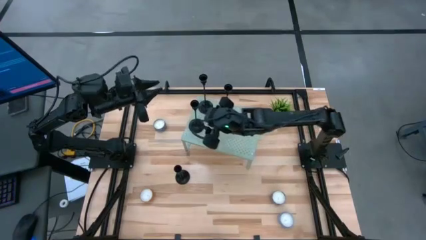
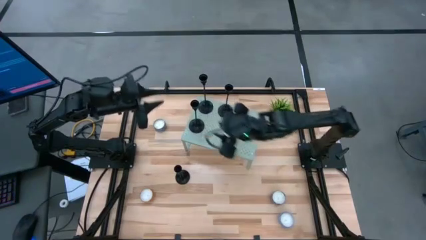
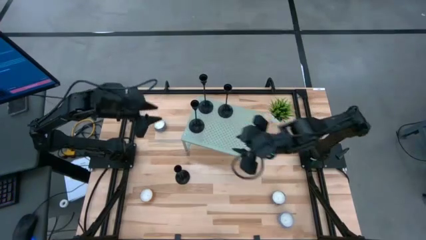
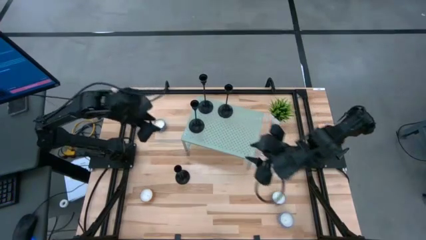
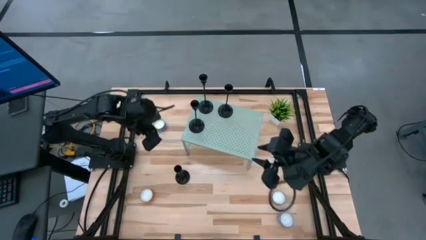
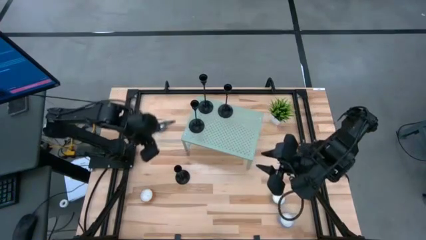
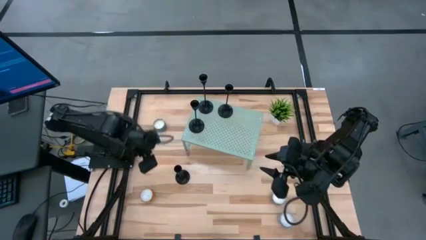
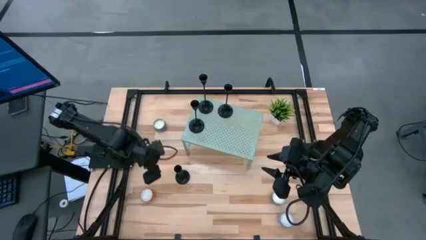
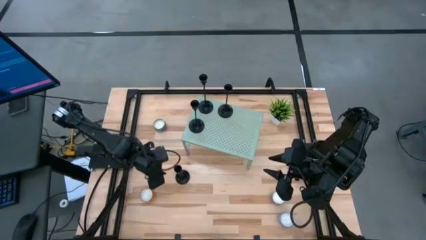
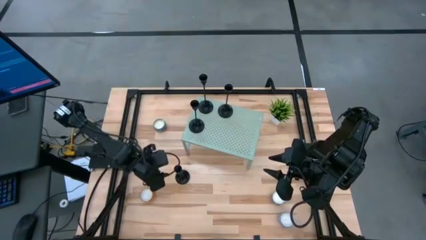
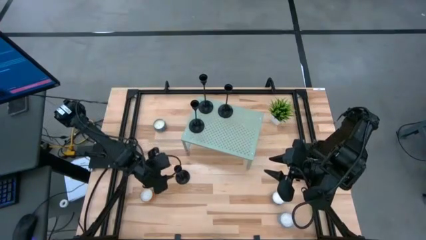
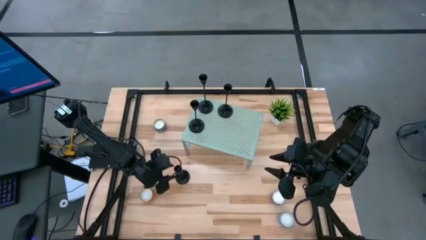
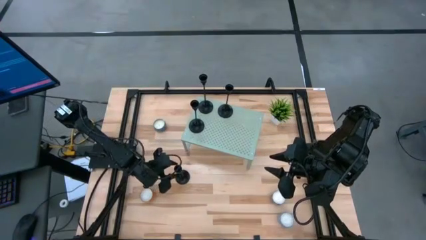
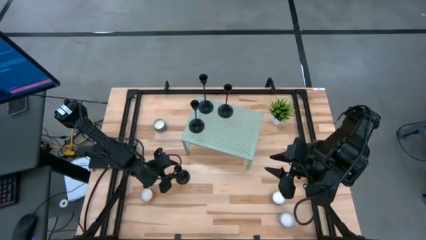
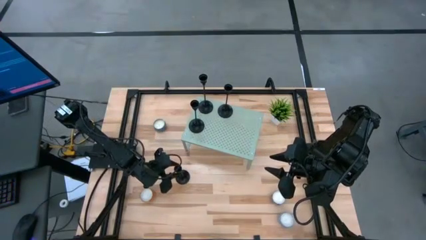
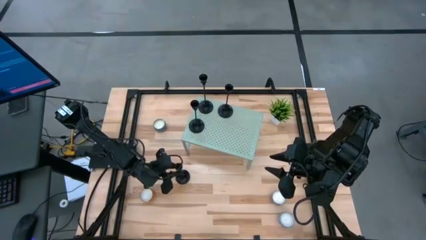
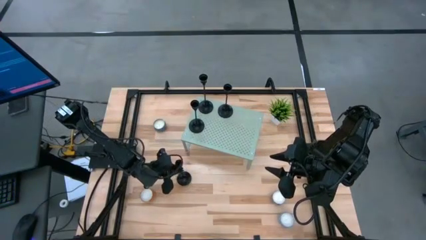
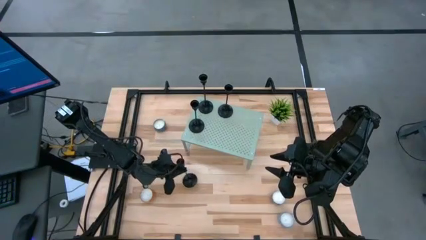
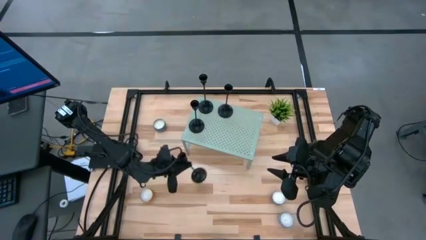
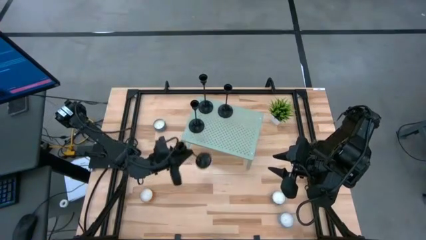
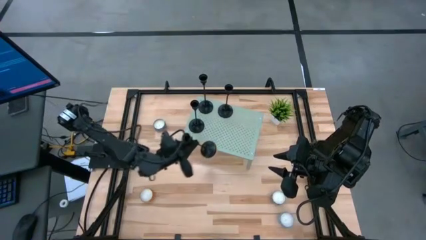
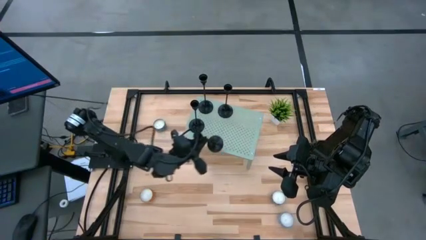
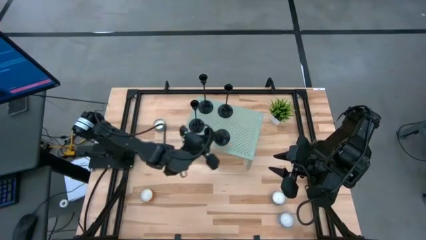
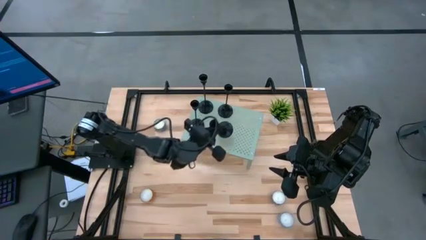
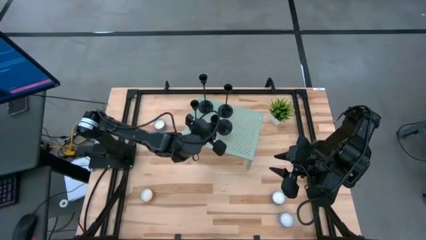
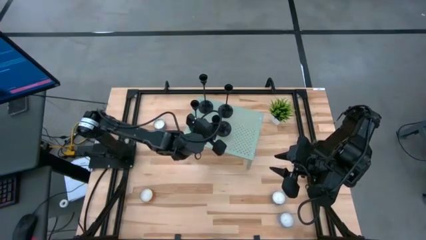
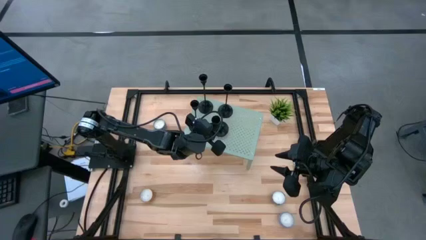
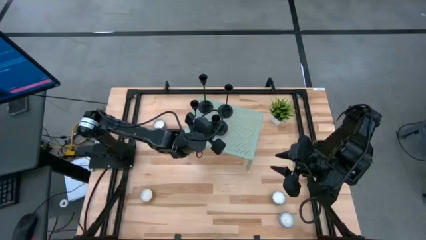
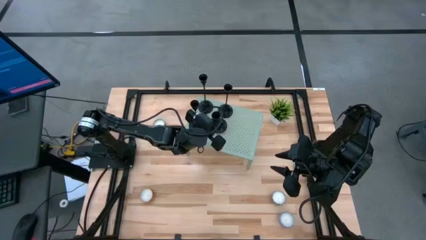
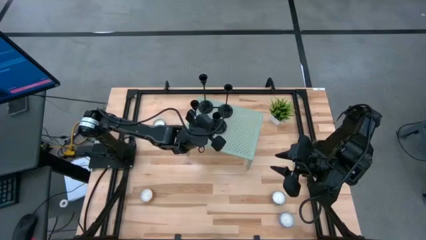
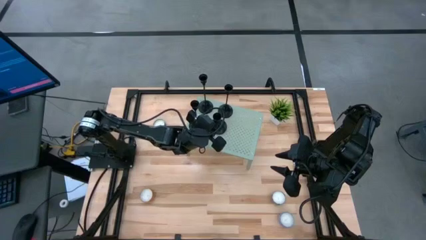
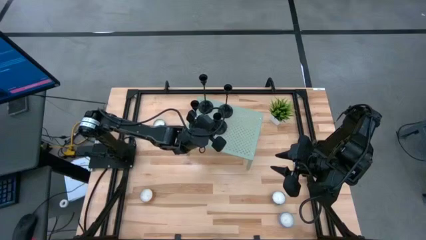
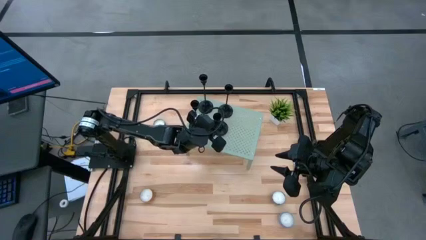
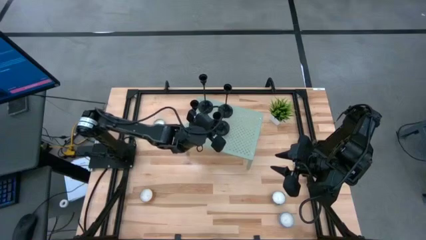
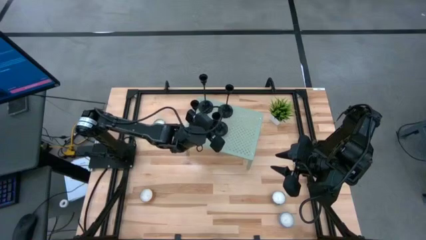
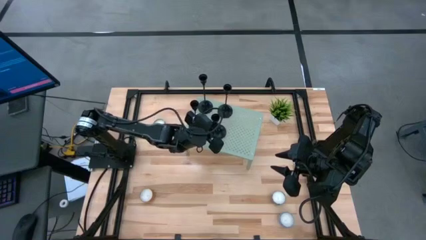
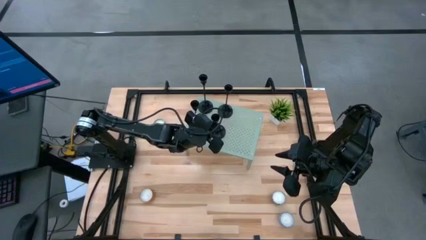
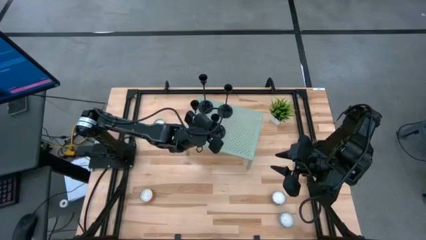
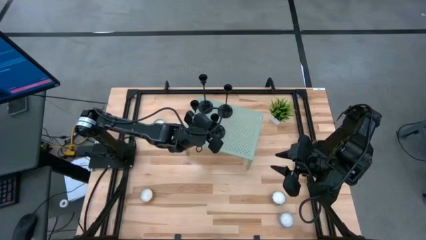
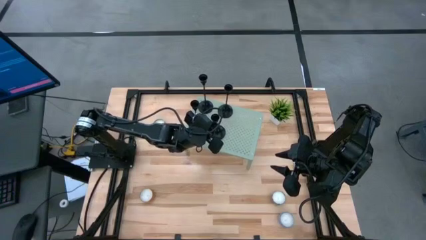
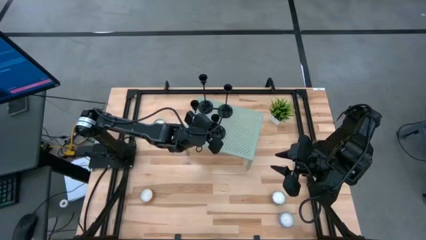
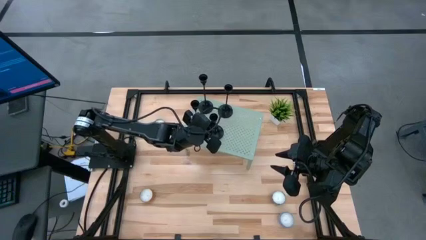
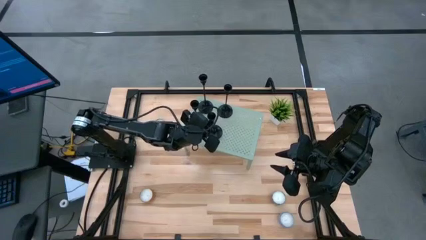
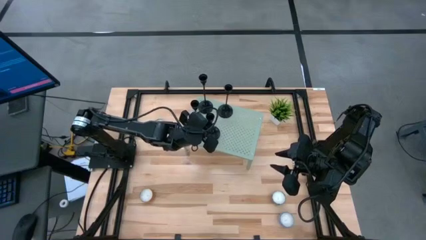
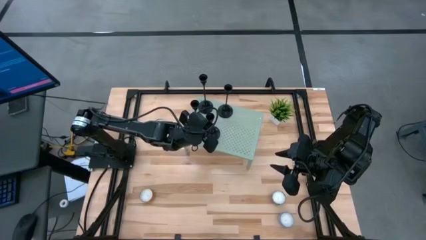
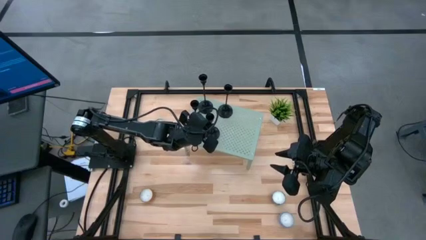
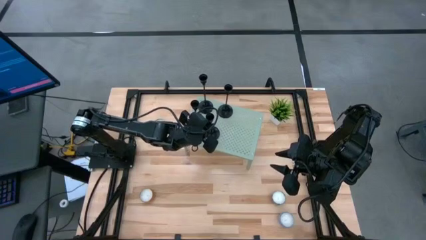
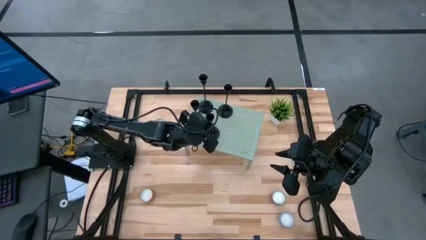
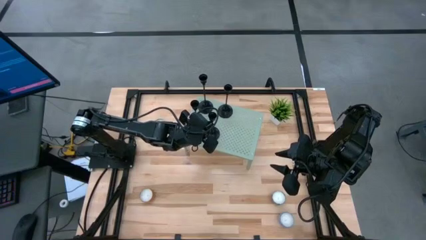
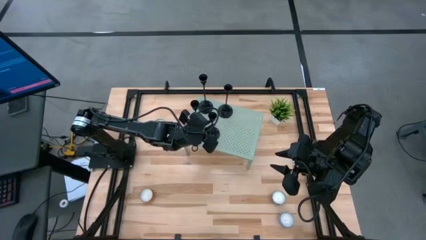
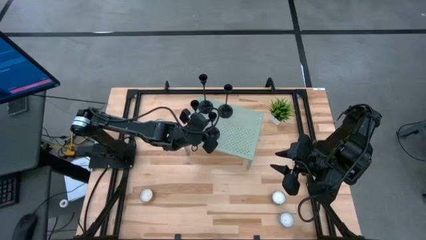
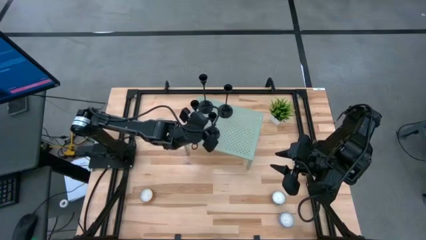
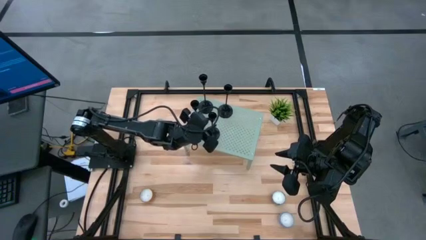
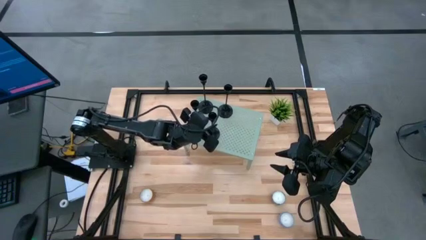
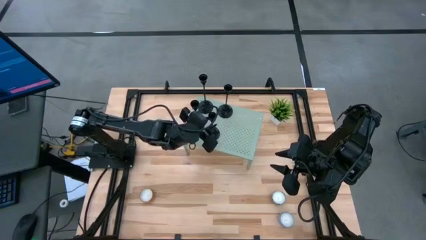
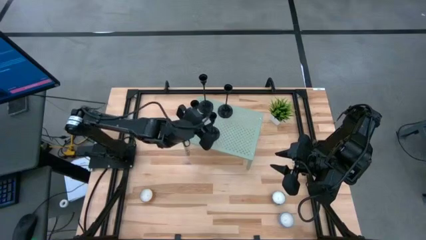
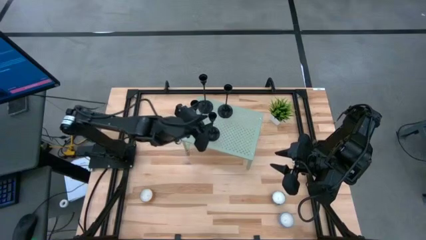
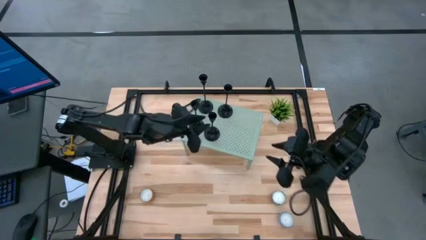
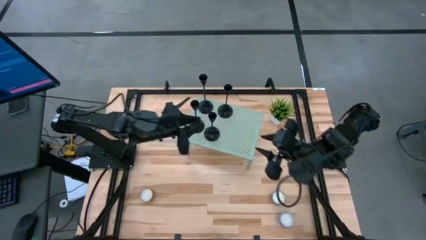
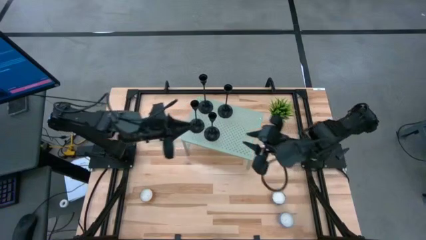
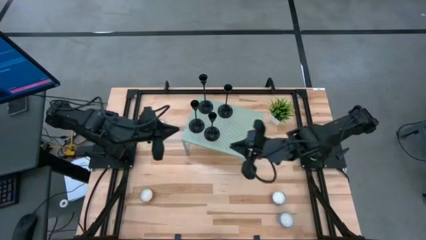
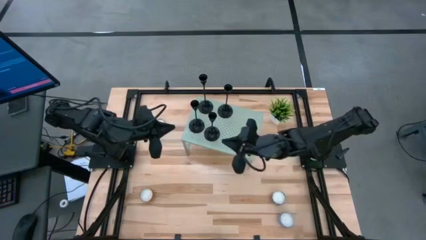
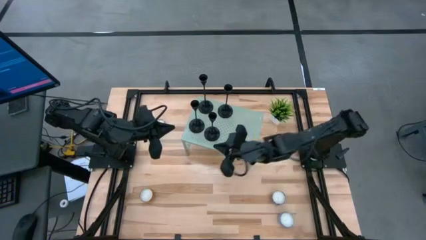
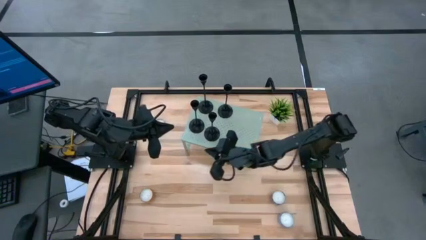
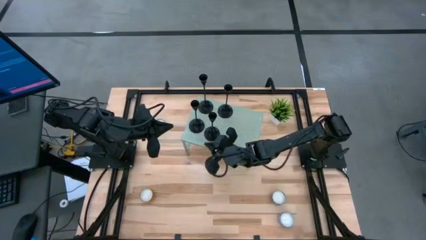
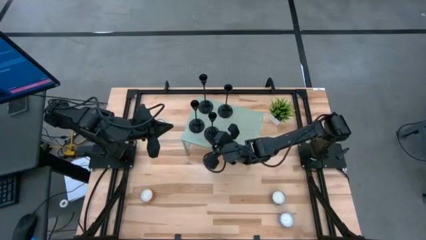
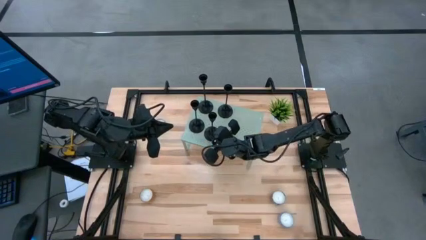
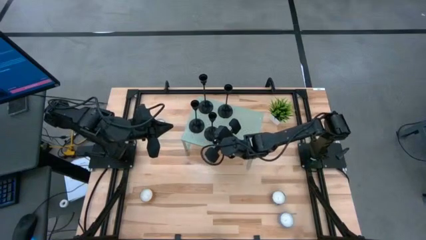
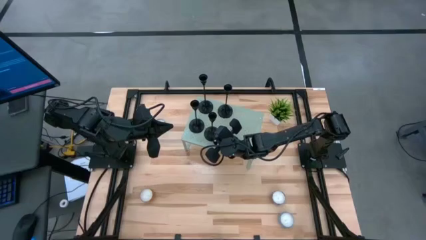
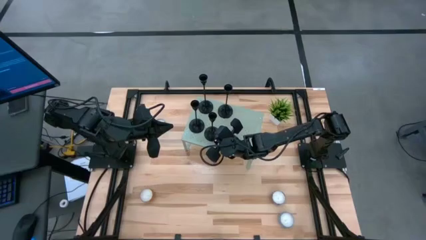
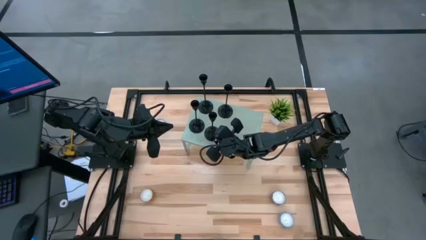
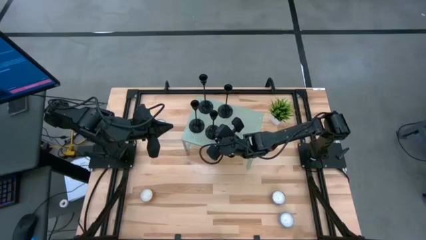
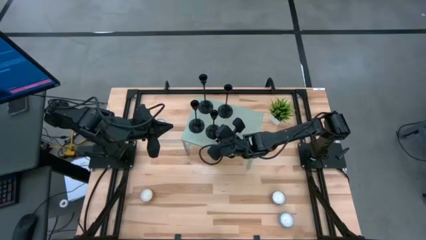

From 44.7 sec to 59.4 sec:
Task: Pick & Place candle stick holders
Align the black candle holder with the other black candle holder on the shelf

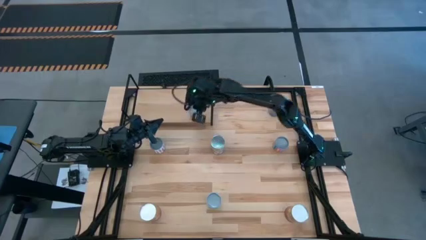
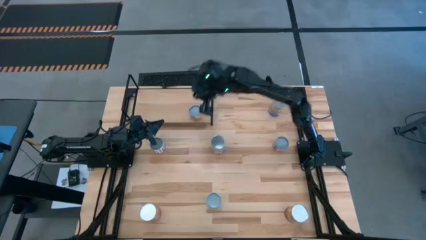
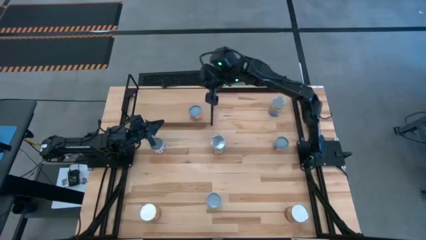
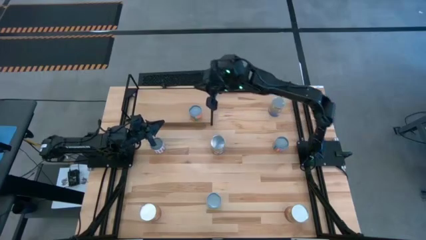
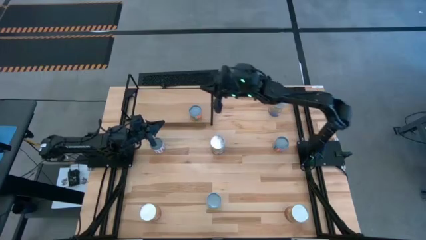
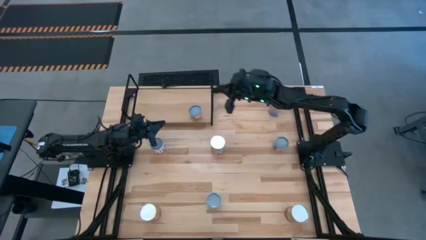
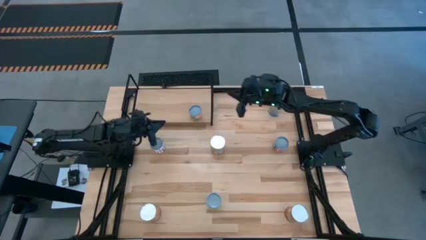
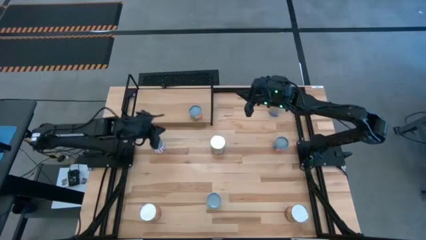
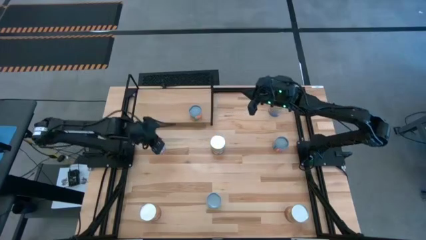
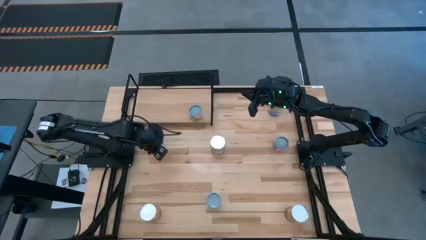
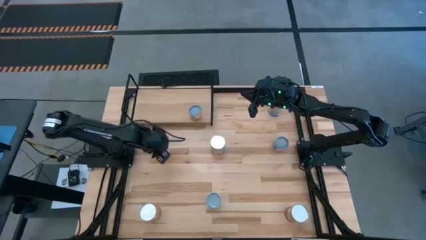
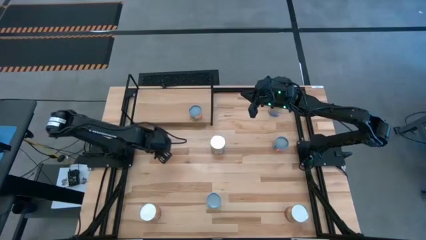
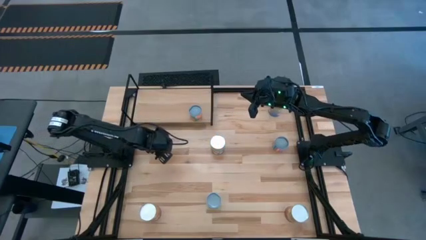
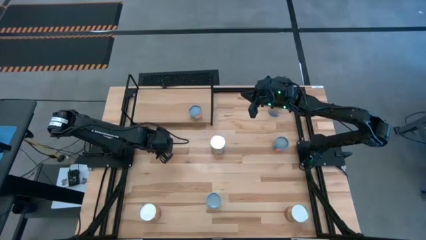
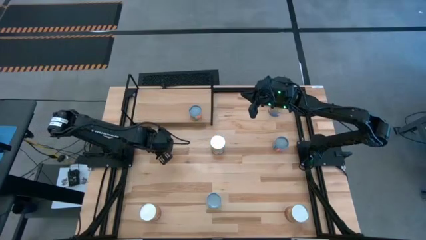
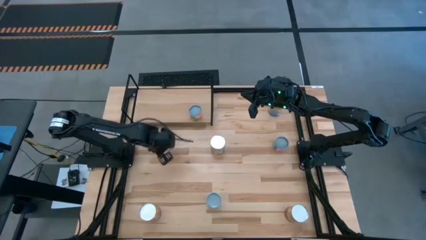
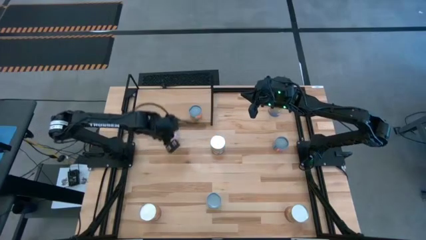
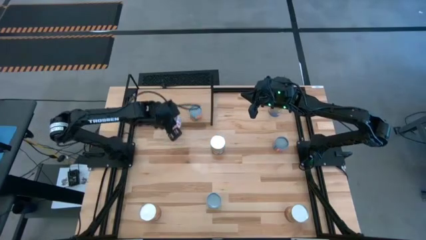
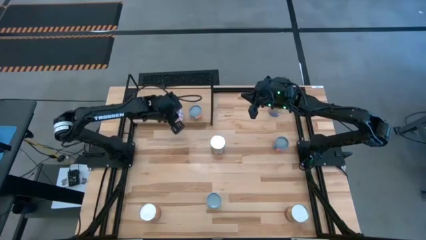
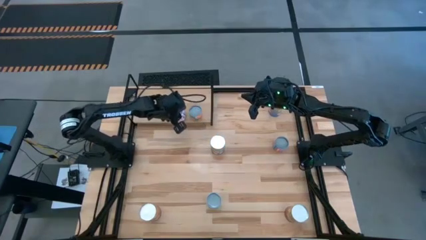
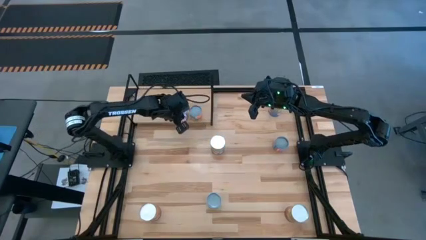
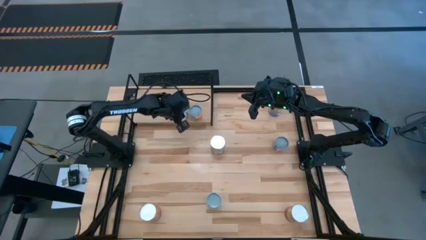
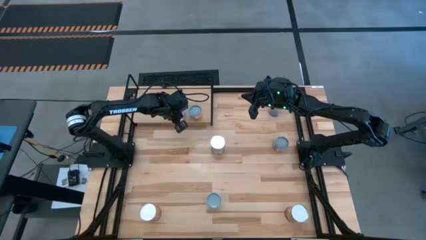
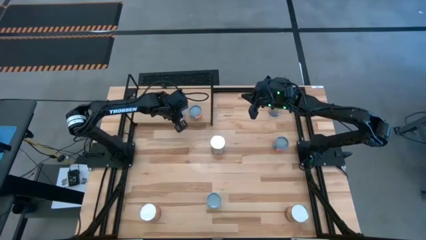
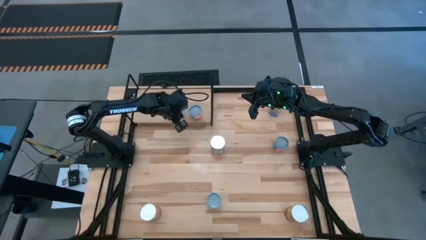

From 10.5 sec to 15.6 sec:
Task: Pick and place cans onto a shelf
Put the small canned fresh sliced carrots on the shelf
